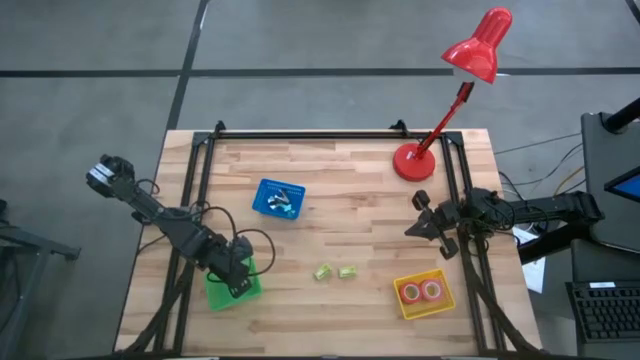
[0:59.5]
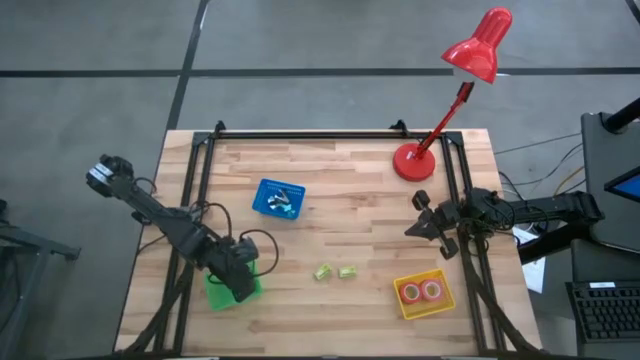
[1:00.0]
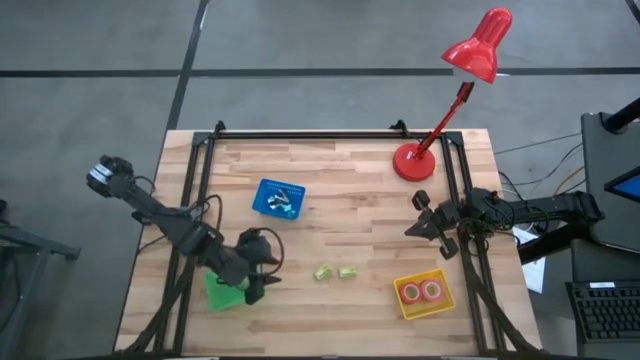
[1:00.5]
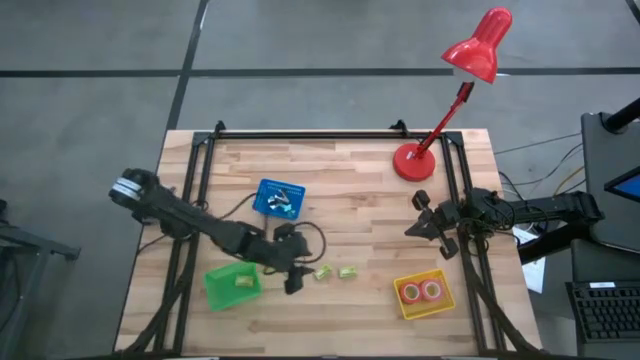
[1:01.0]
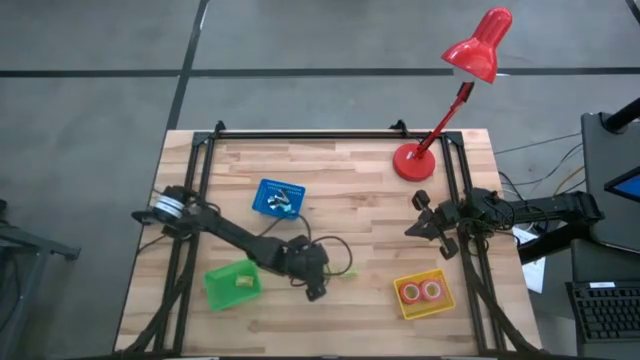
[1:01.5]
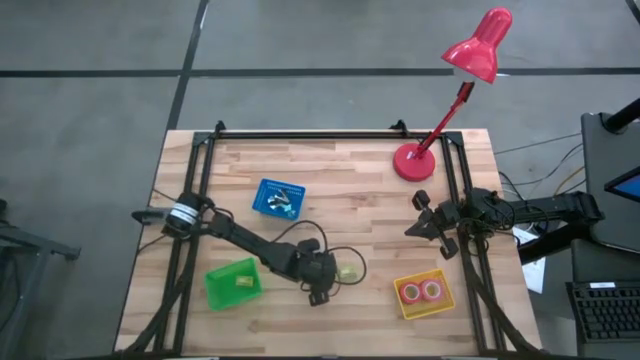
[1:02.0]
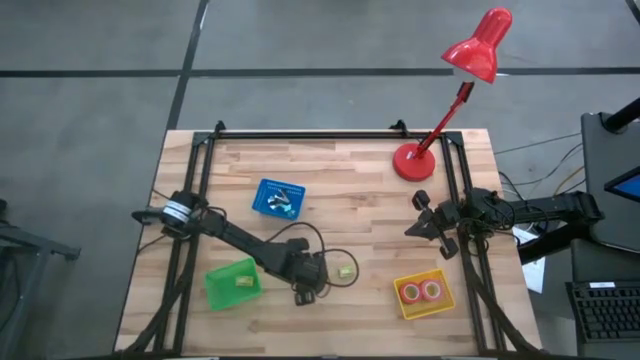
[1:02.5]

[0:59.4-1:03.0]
Task: Pick and place Stapler, Stapler remover, tape
Put the left green staple box into the green bin

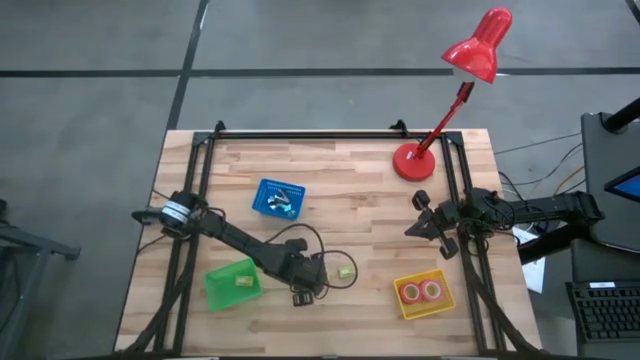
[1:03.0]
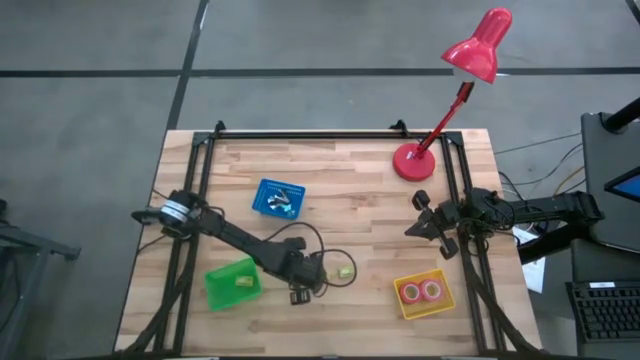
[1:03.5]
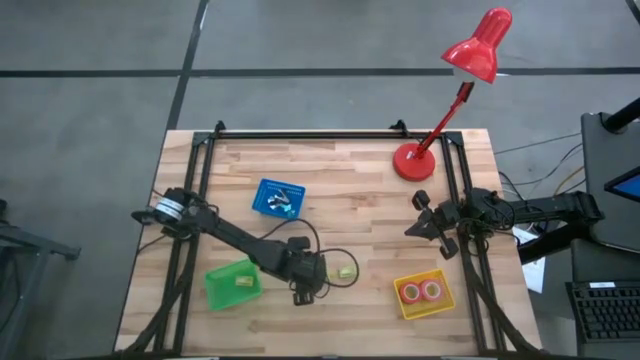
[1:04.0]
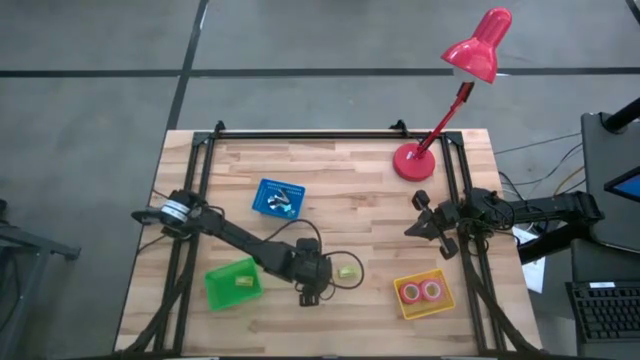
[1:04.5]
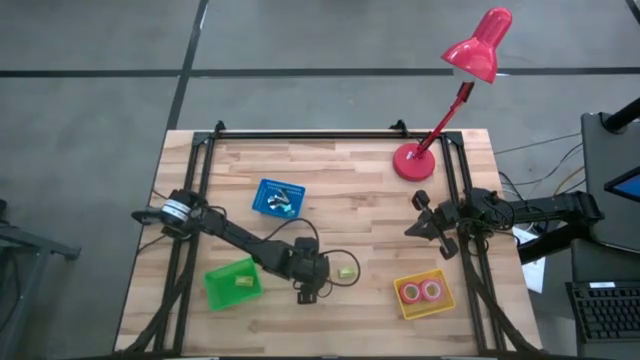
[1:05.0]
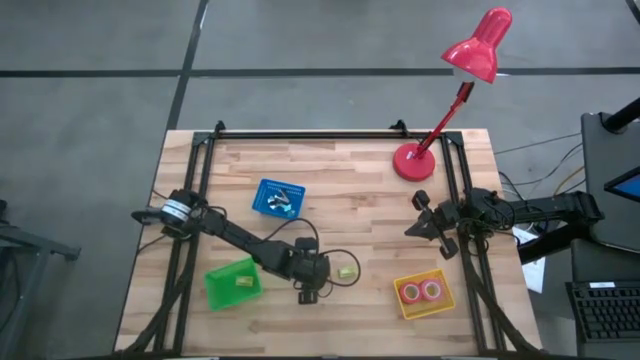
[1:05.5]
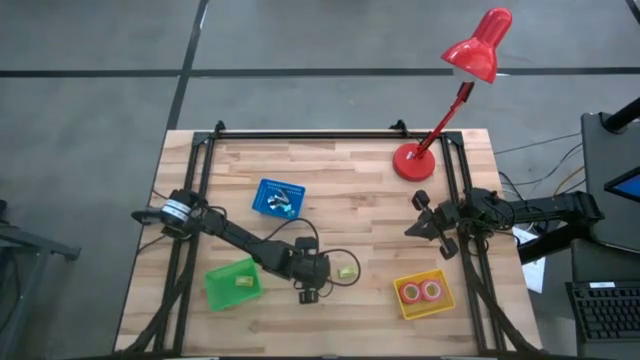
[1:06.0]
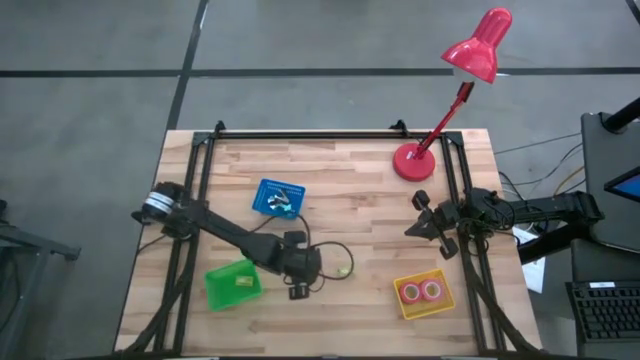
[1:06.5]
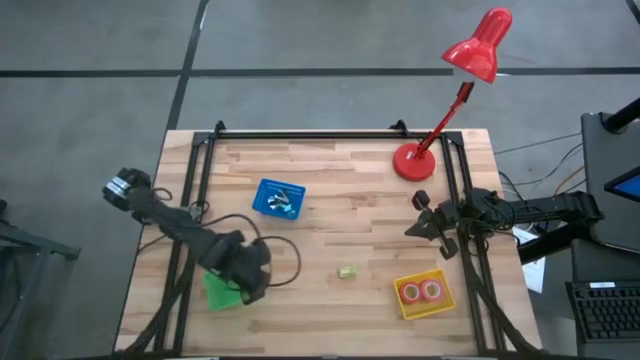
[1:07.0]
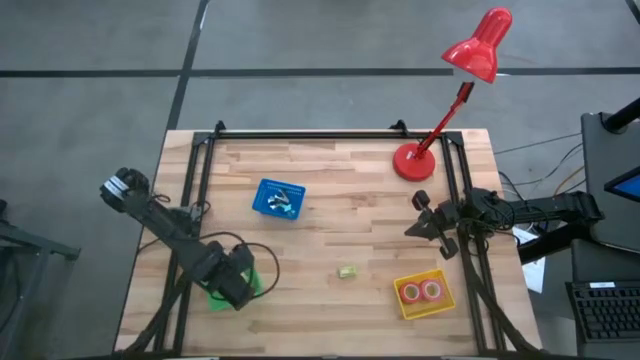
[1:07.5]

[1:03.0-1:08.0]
Put the left green staple box into the green bin

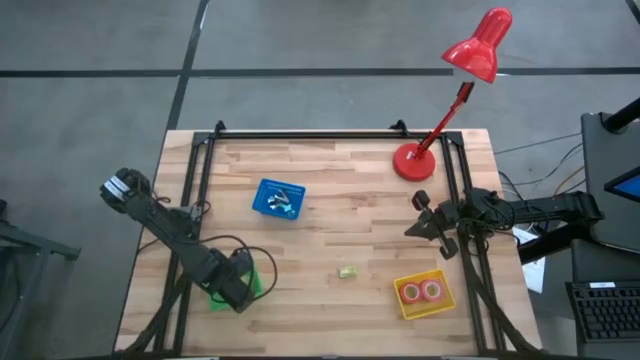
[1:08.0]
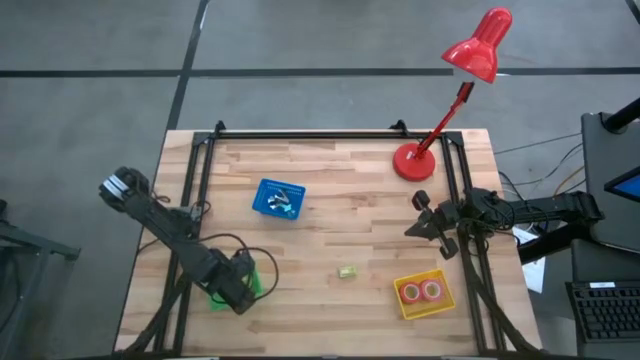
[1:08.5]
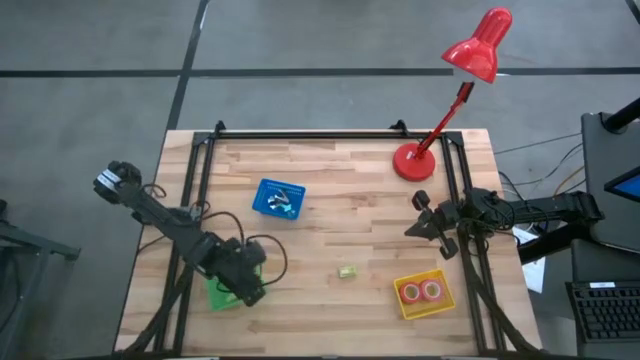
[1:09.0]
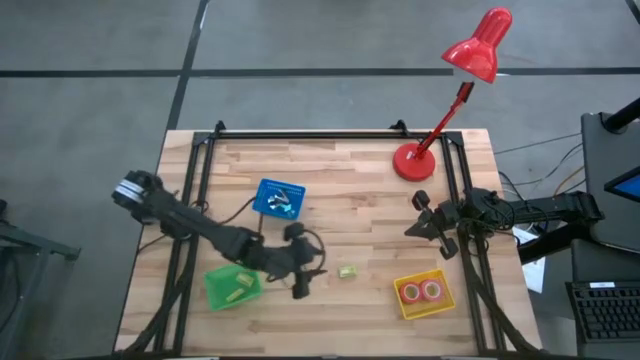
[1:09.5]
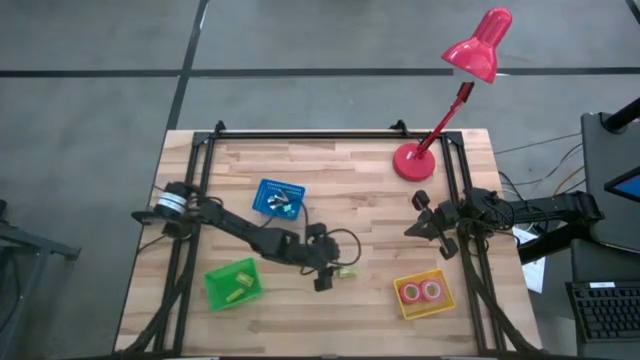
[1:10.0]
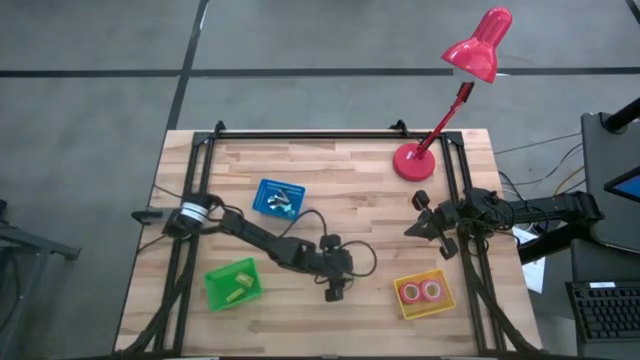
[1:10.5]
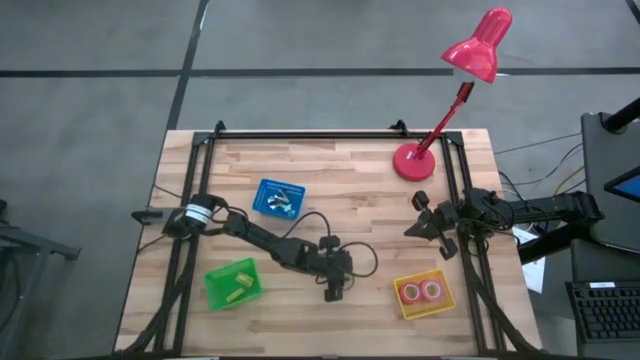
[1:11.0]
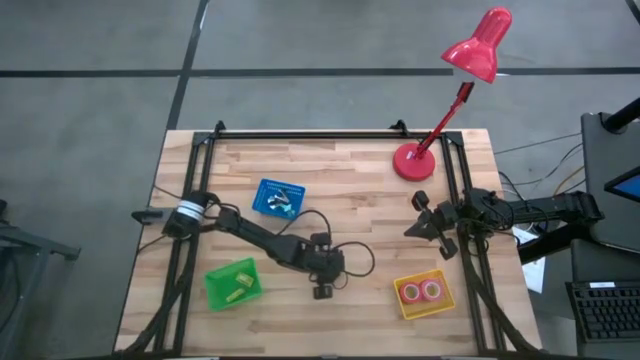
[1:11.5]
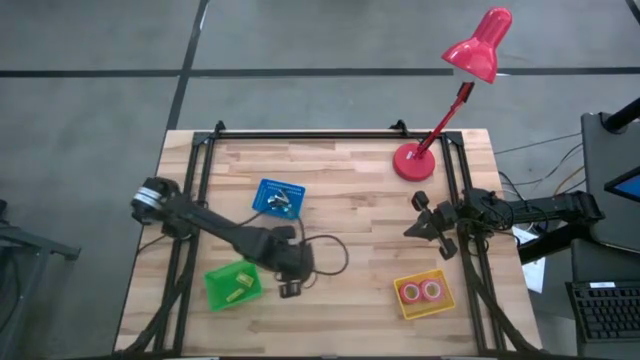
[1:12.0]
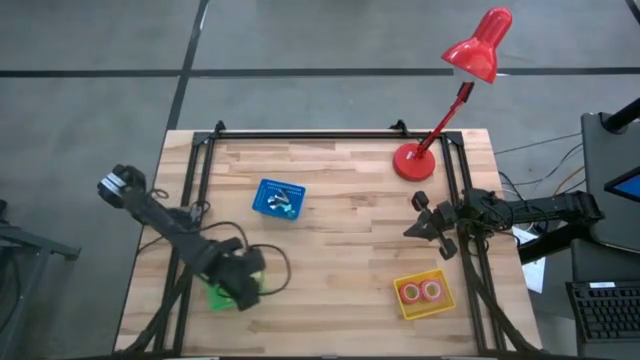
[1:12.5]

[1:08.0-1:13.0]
Put the green staple box into the green bin

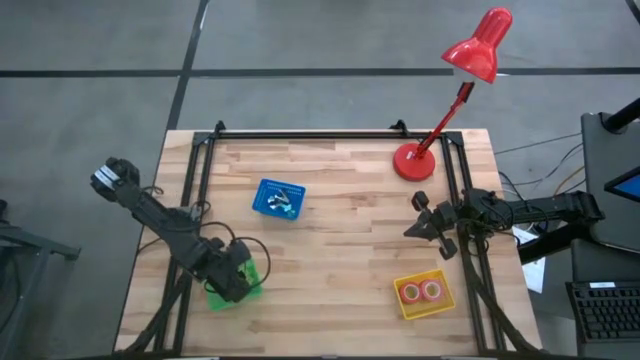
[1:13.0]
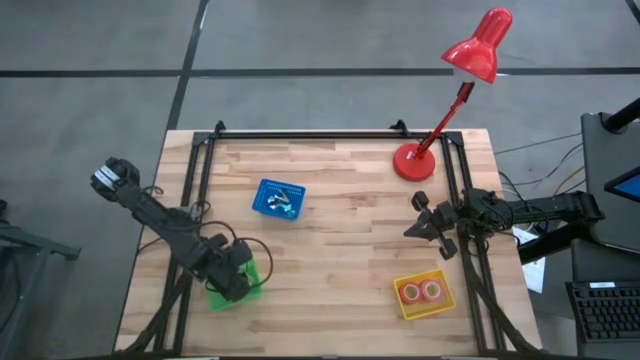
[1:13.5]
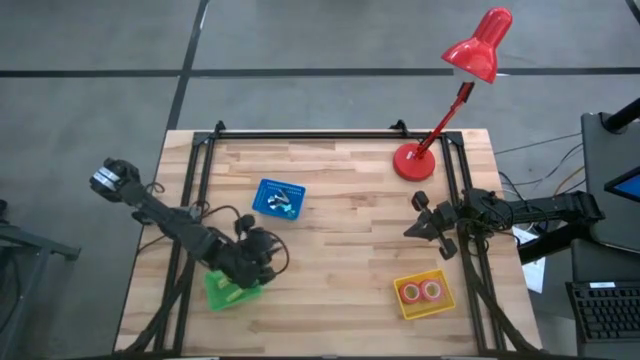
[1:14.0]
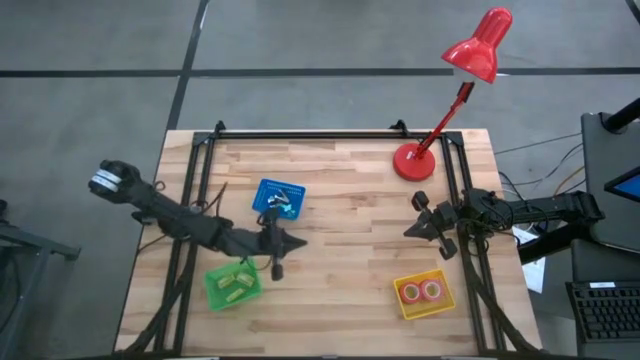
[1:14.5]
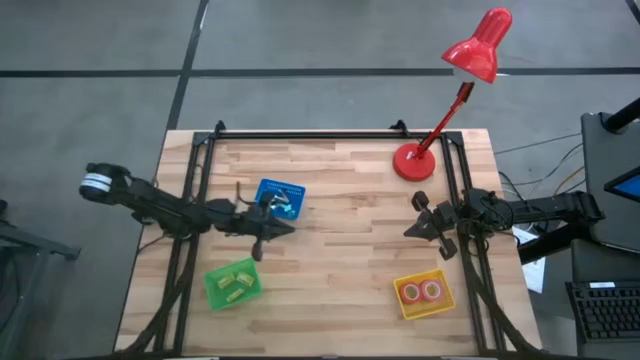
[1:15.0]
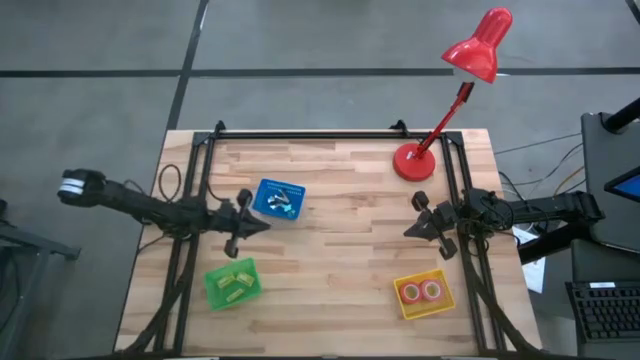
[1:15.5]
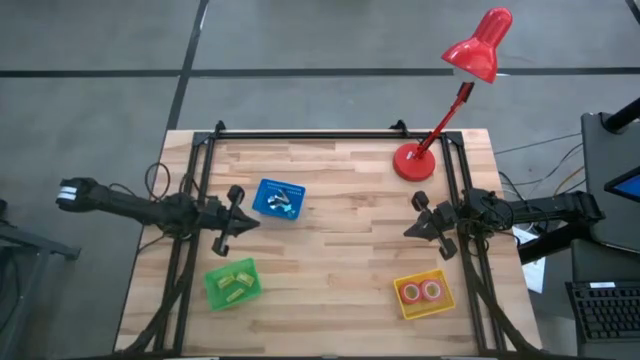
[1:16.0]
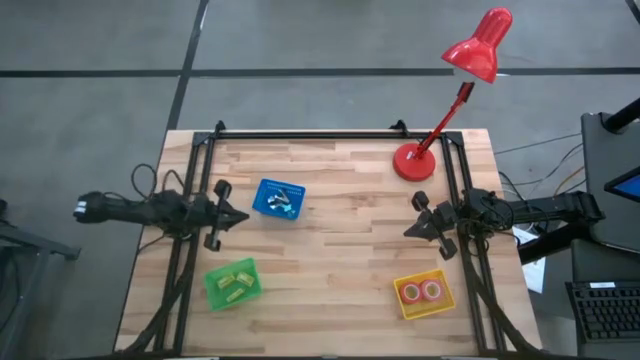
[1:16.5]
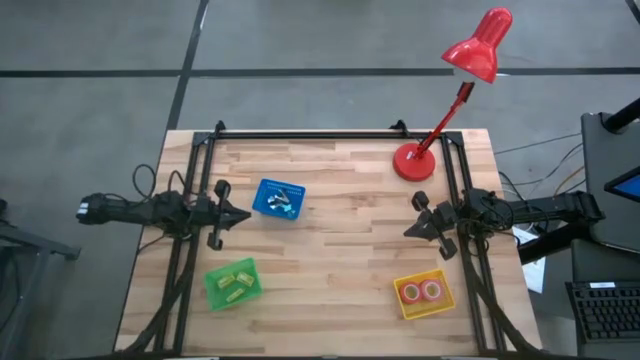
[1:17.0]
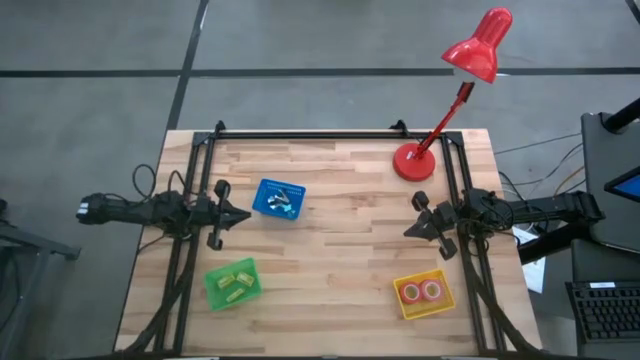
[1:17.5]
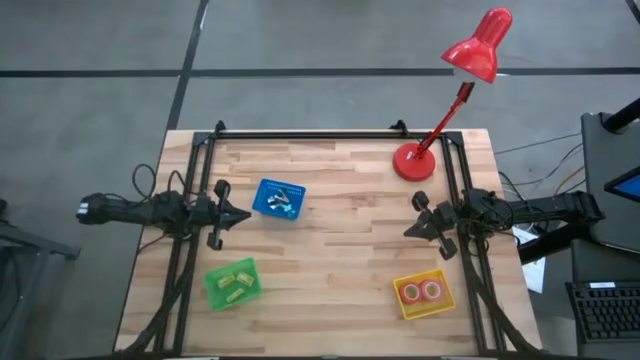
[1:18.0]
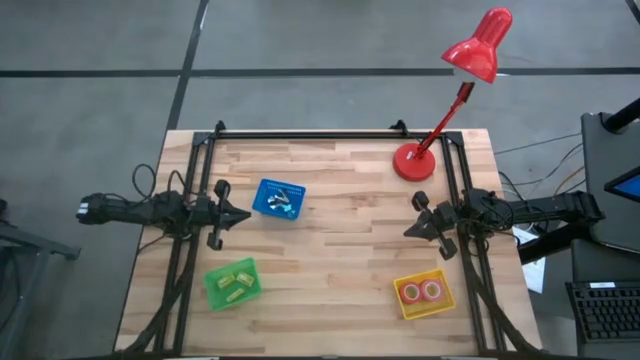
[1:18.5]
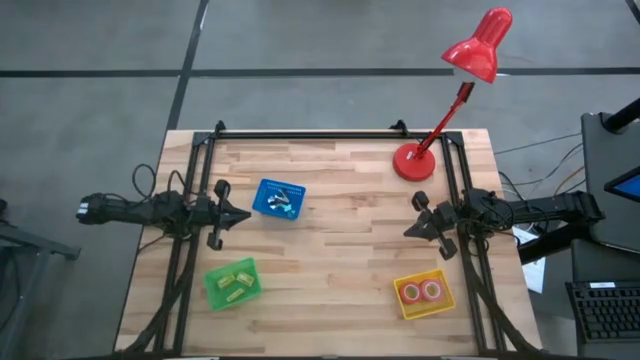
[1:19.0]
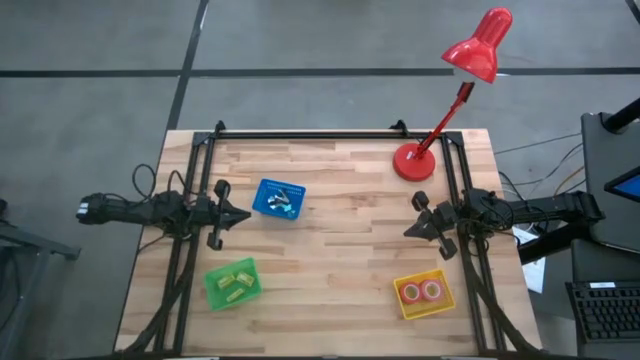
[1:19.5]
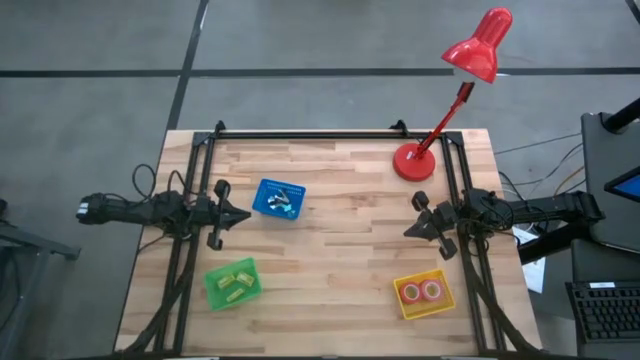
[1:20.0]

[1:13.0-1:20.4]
Return to Home Position
